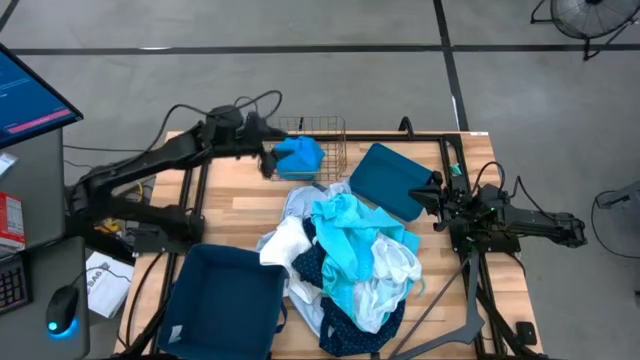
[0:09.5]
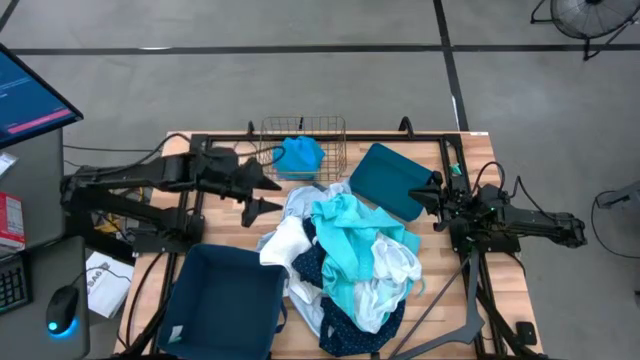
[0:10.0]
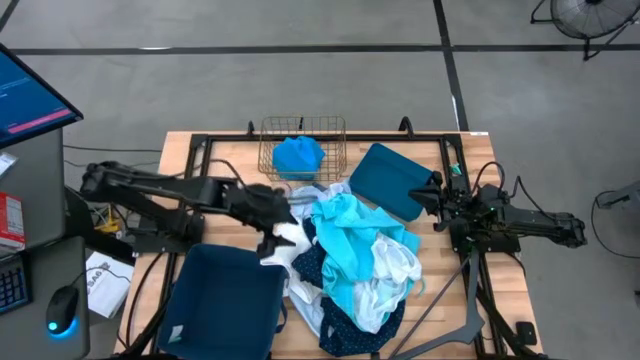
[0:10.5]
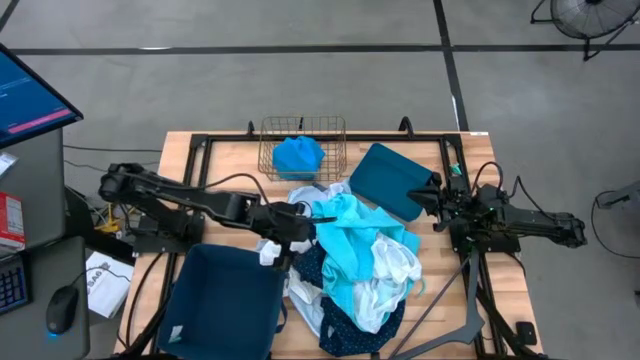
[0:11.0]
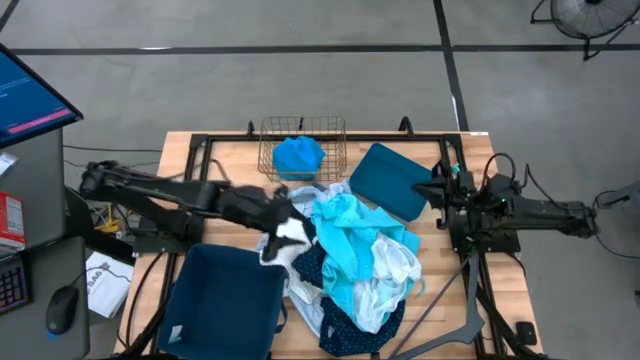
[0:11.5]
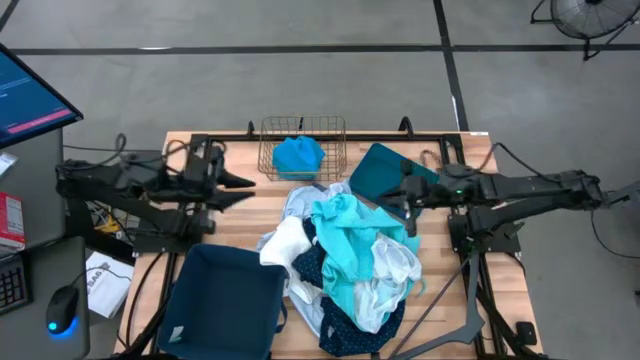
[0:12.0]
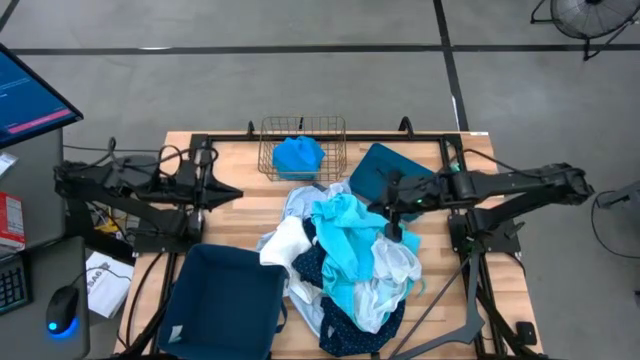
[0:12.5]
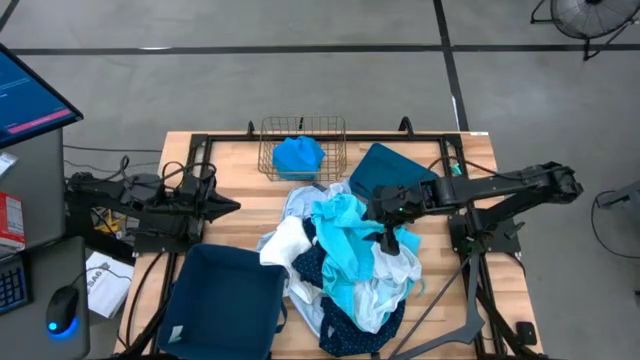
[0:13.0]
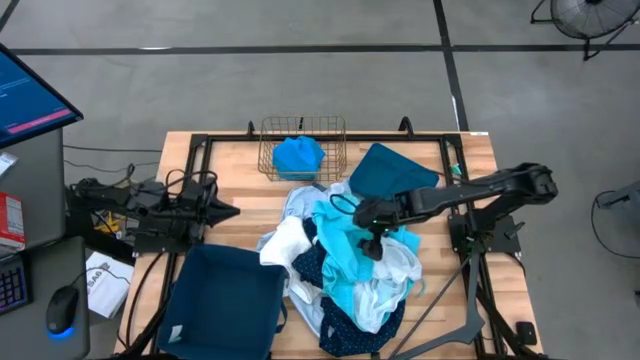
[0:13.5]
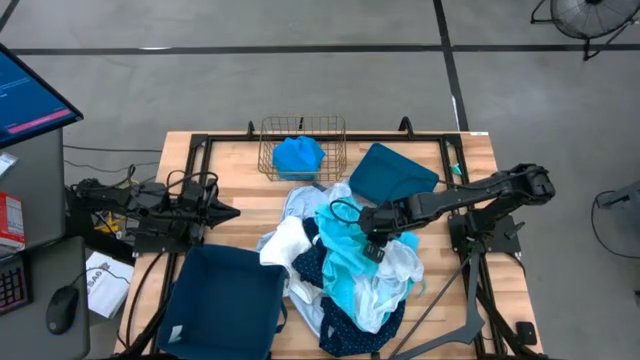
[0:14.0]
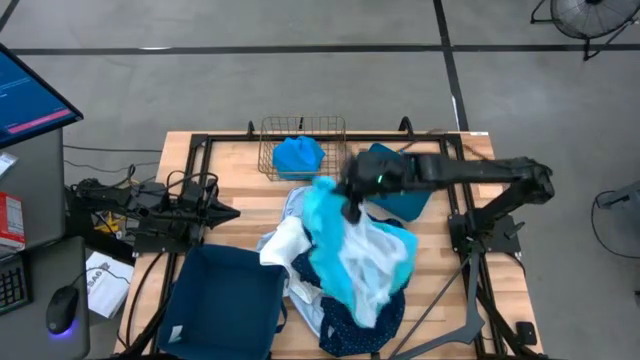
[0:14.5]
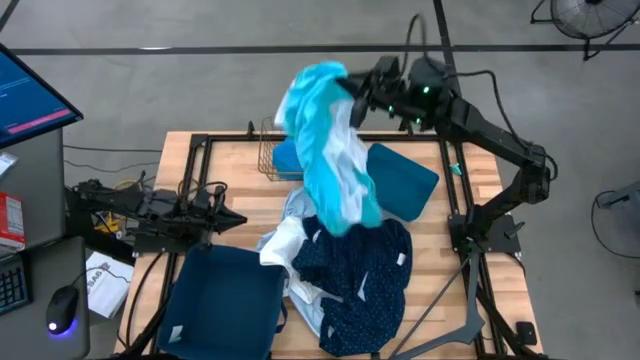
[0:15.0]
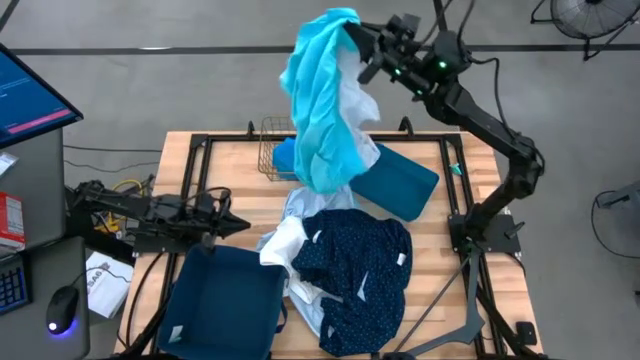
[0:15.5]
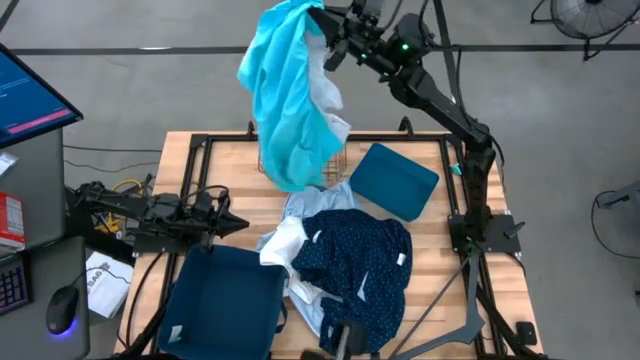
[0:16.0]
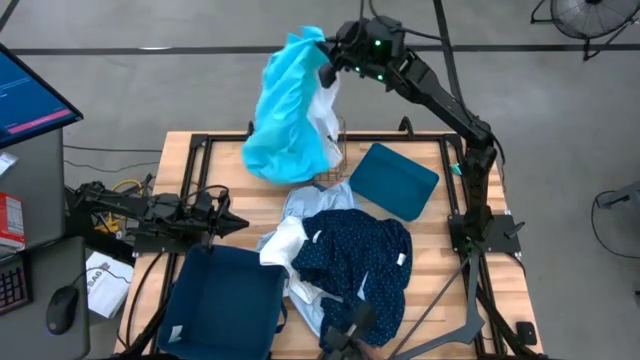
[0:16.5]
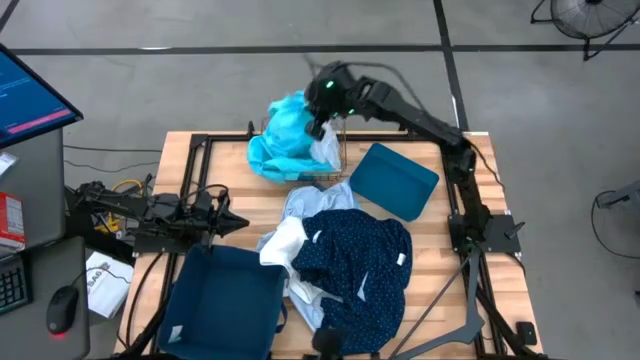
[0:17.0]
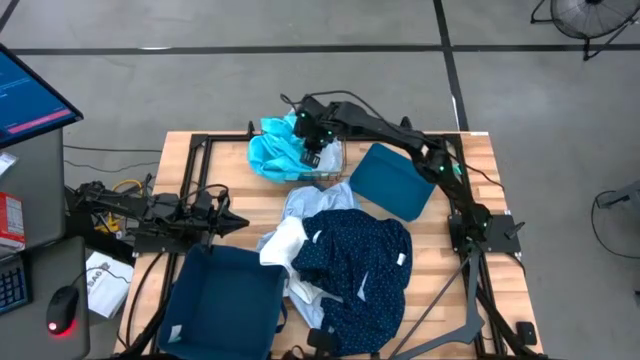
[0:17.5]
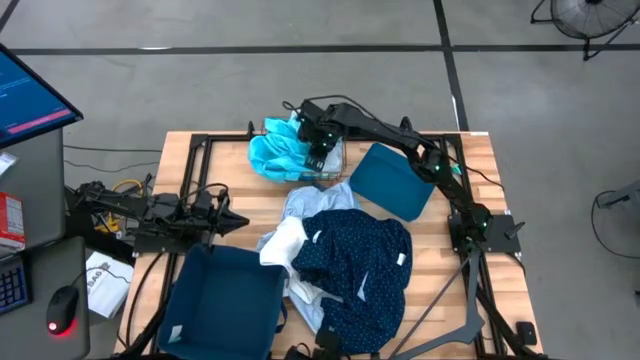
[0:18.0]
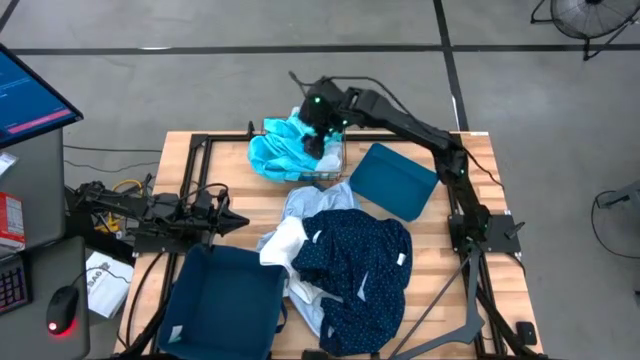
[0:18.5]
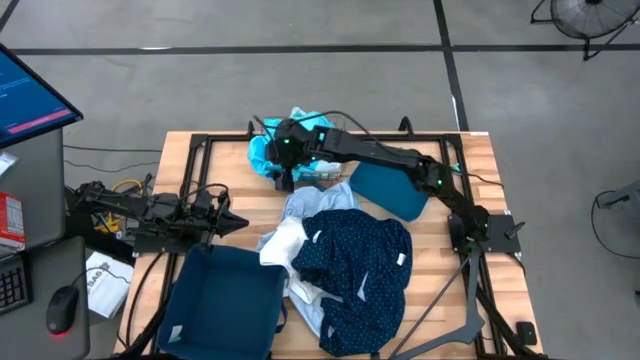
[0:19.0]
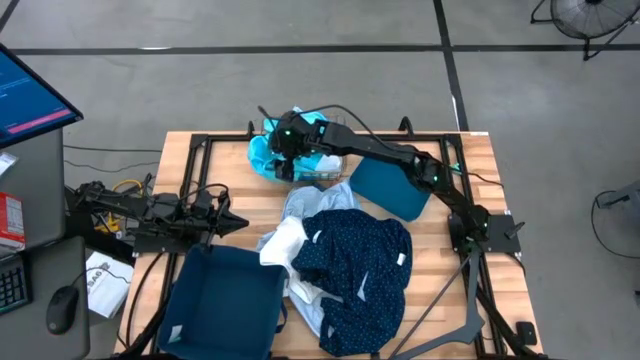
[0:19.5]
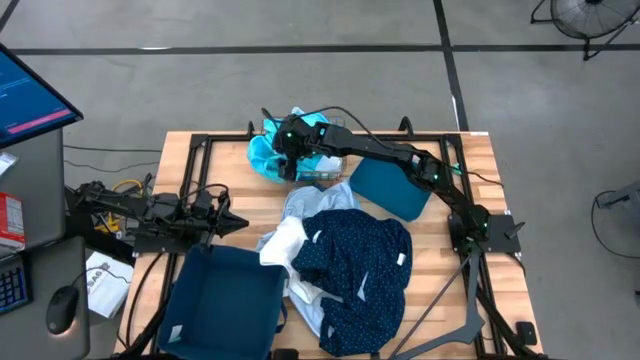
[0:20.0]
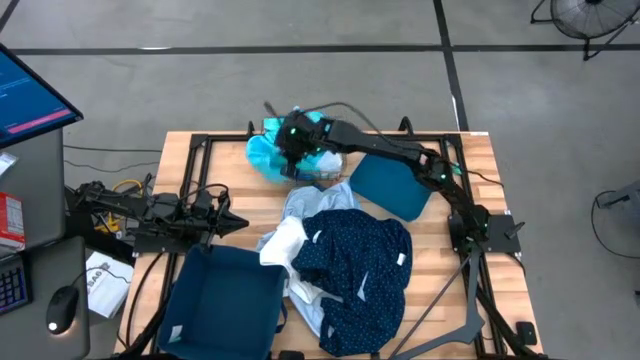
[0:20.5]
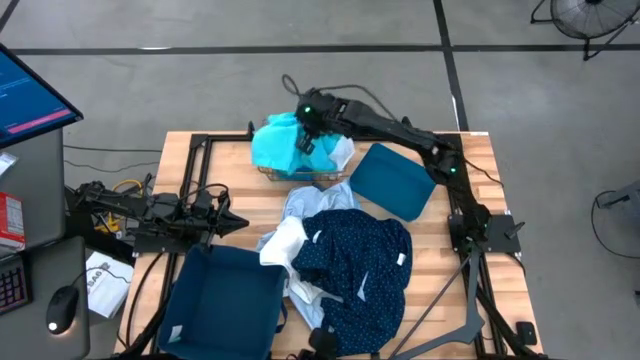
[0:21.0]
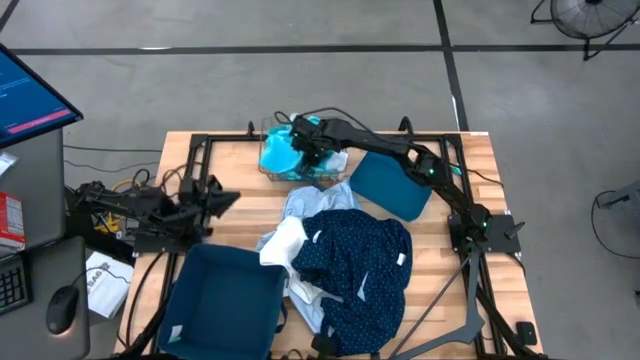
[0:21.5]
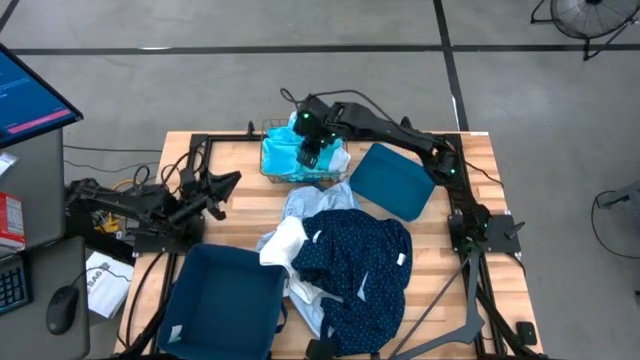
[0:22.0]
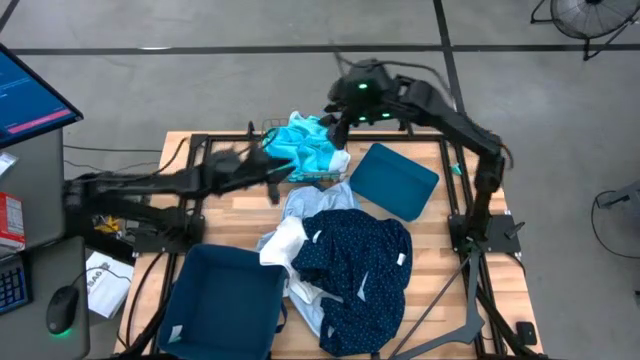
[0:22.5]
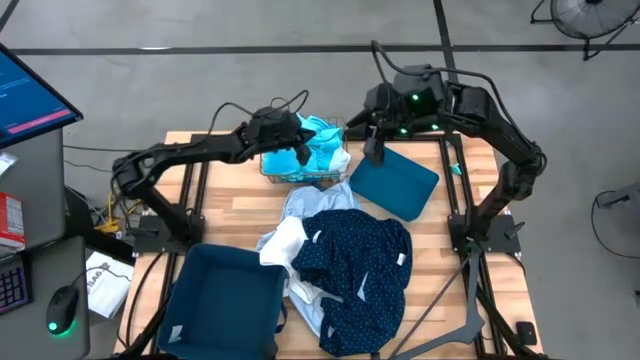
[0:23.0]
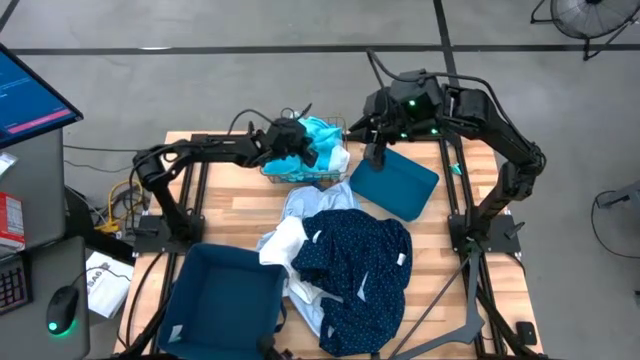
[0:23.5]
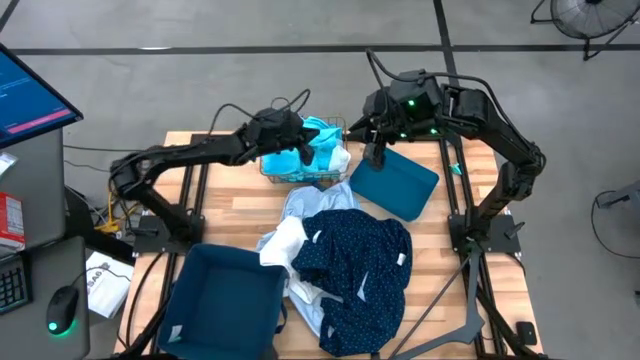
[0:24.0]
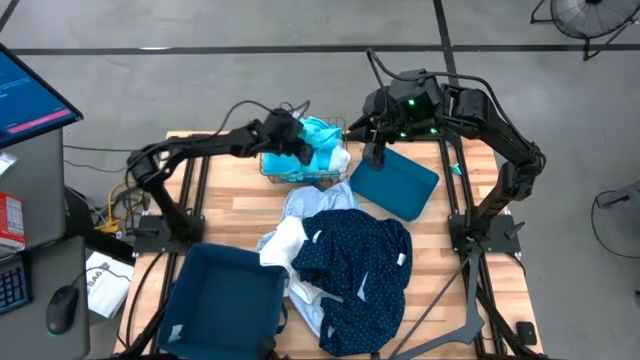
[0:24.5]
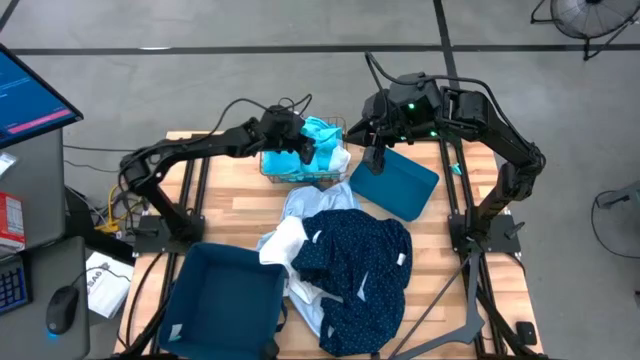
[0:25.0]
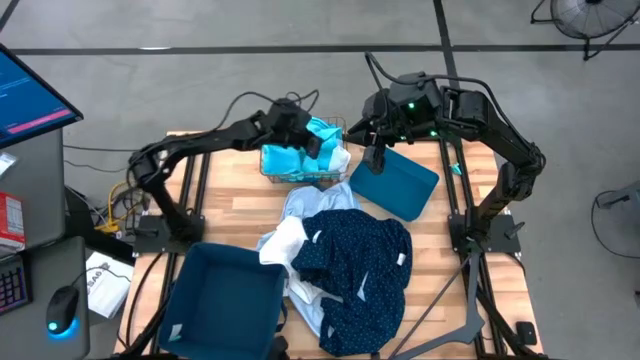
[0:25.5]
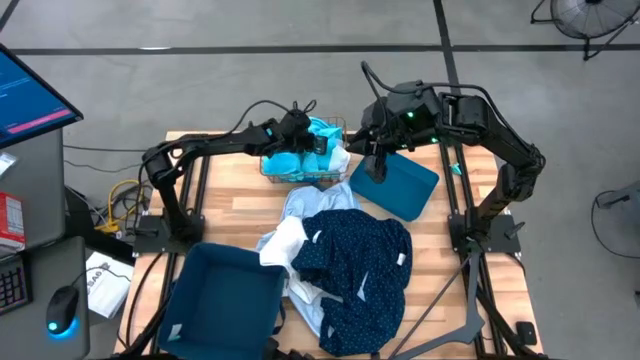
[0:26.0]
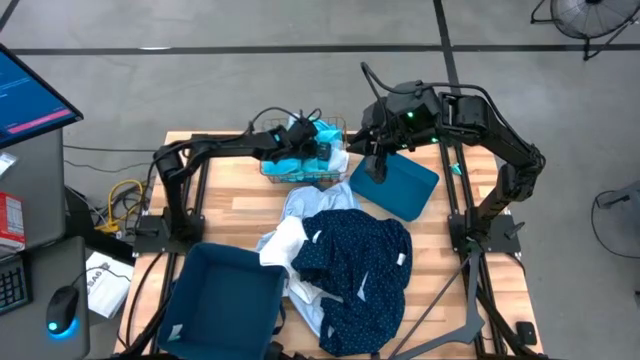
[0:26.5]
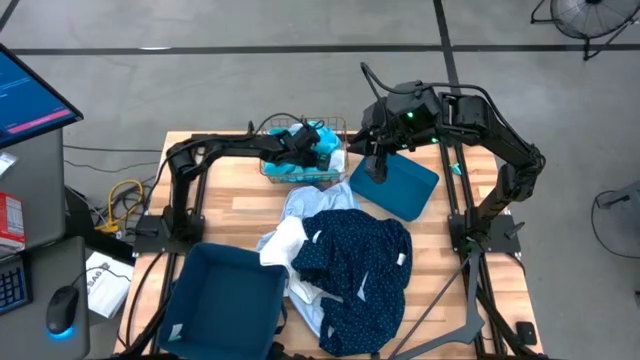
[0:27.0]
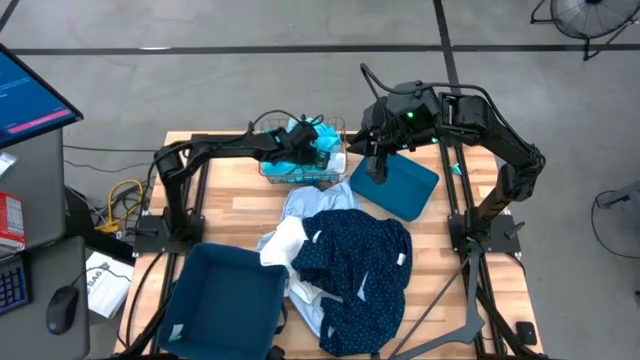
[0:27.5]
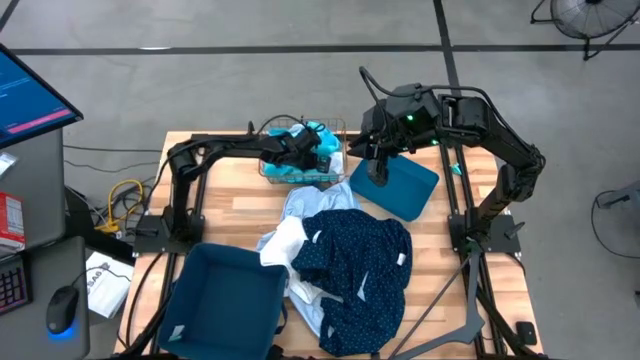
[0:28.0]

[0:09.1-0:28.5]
Task: Pick & Place Cloths
Put the light blue shorts into the gold basket

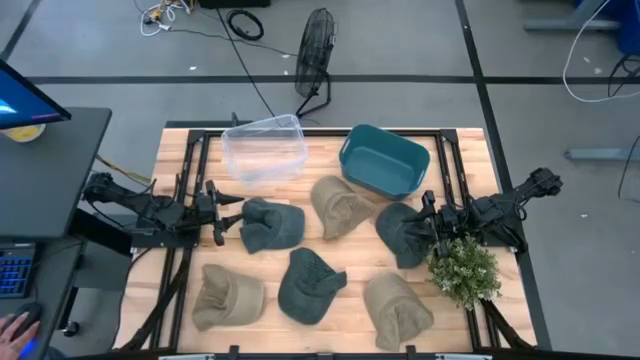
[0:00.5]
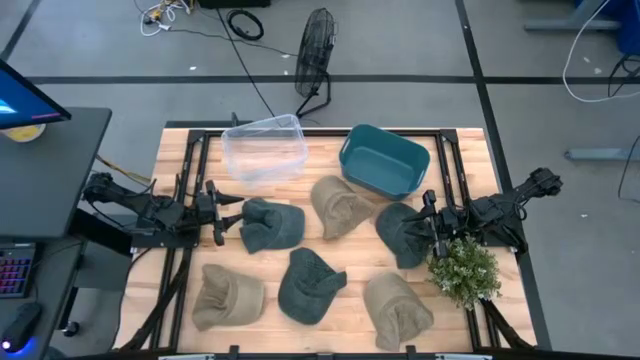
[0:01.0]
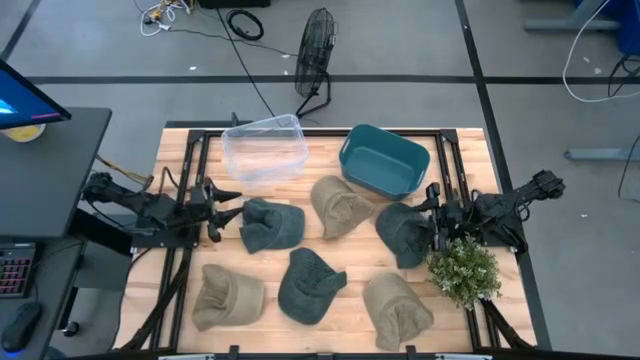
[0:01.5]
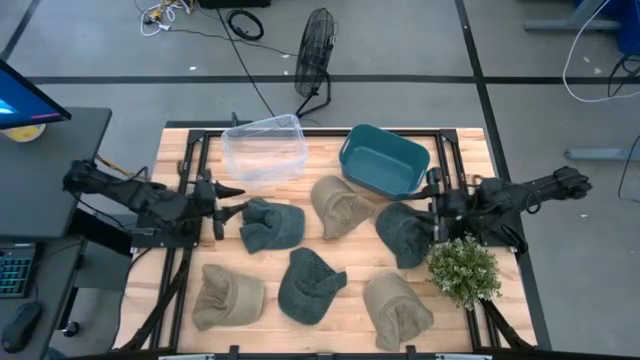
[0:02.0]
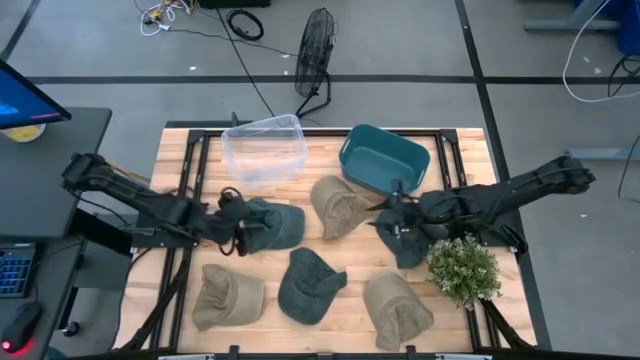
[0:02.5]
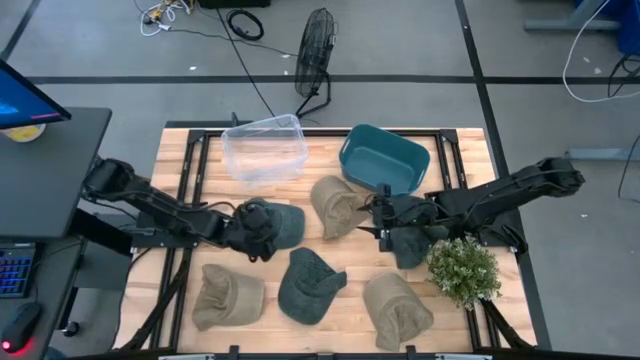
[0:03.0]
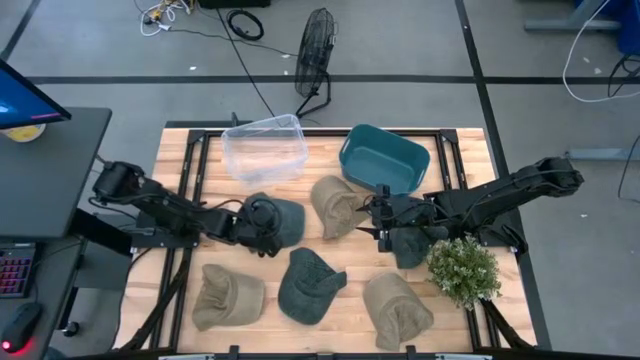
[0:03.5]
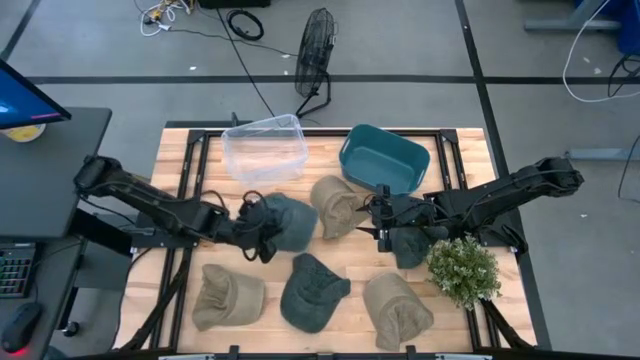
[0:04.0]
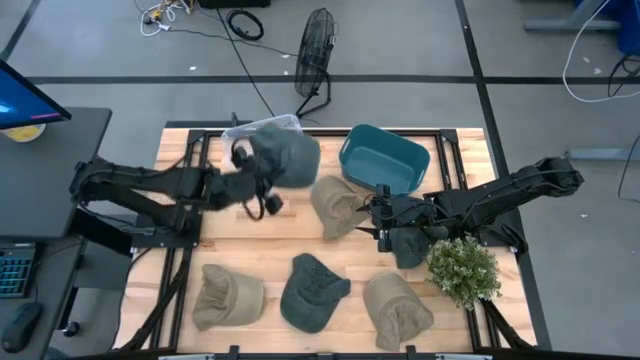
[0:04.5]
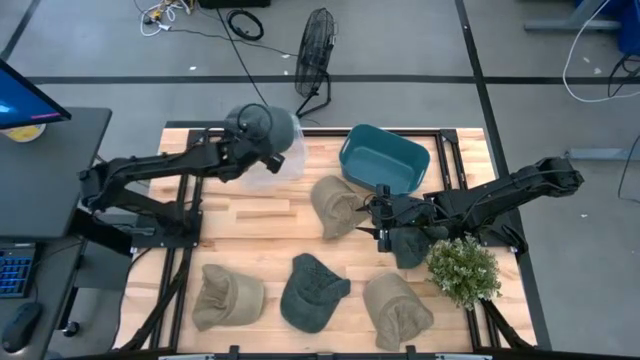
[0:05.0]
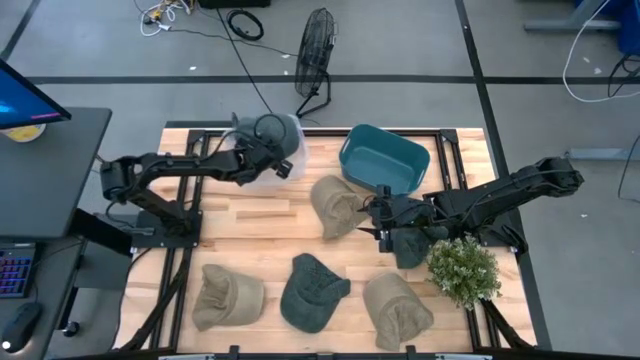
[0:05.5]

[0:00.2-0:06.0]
Task: Pick & Place hat
Put the left blue cap into the transparent bin
